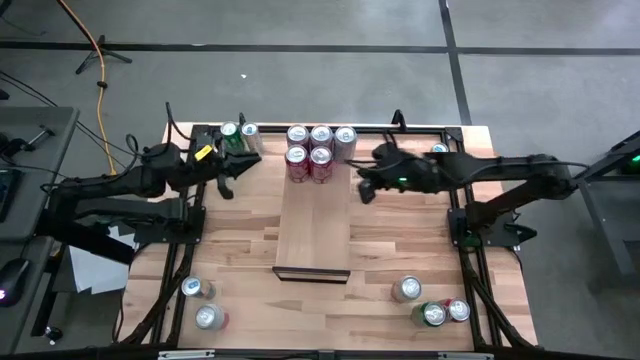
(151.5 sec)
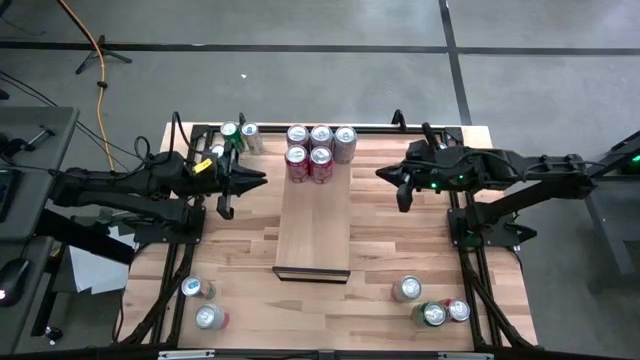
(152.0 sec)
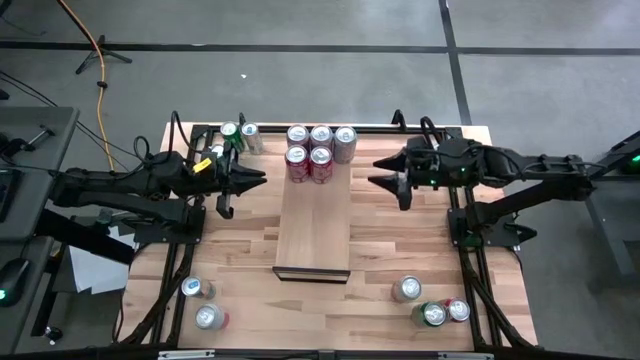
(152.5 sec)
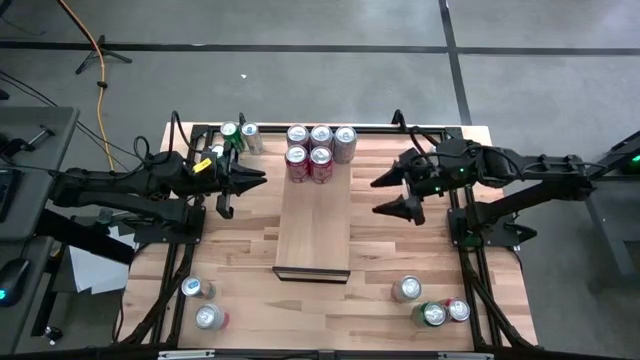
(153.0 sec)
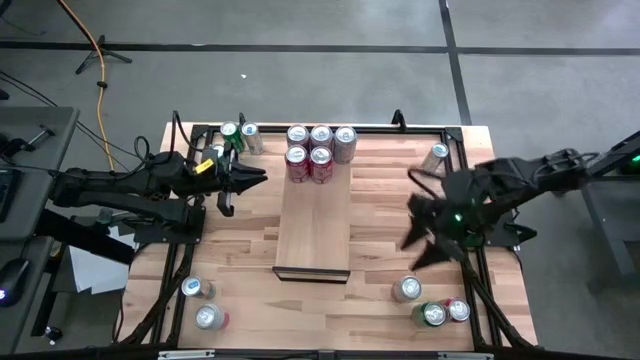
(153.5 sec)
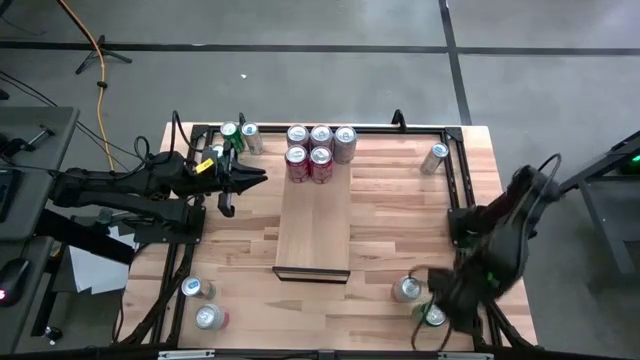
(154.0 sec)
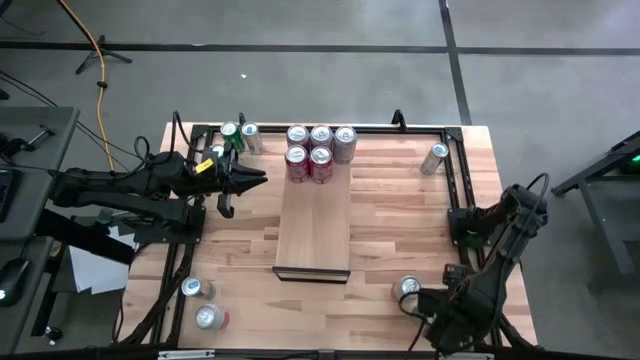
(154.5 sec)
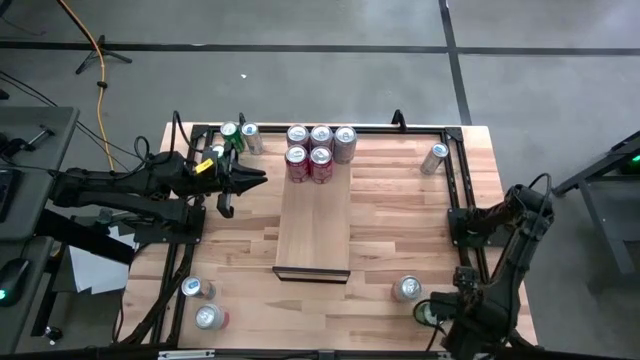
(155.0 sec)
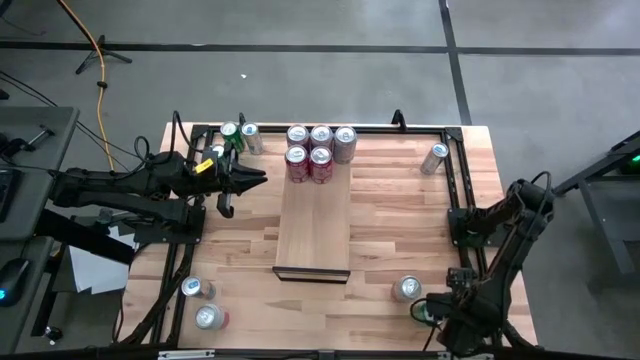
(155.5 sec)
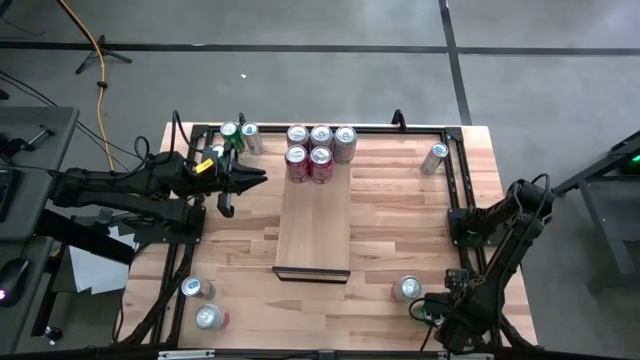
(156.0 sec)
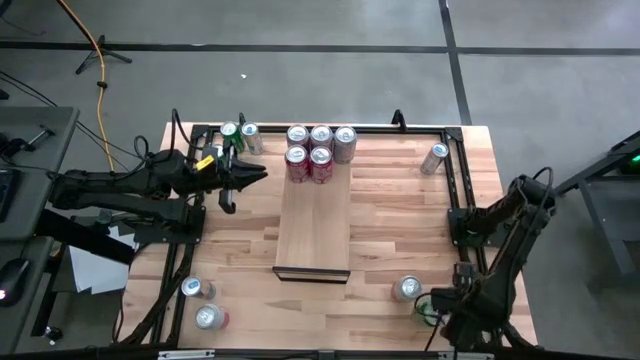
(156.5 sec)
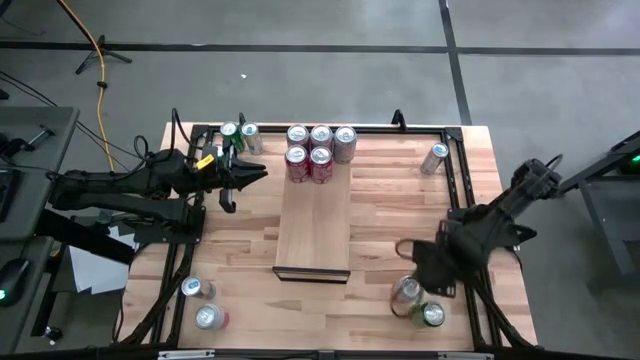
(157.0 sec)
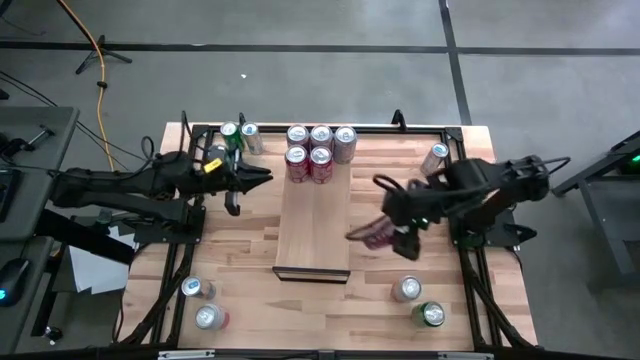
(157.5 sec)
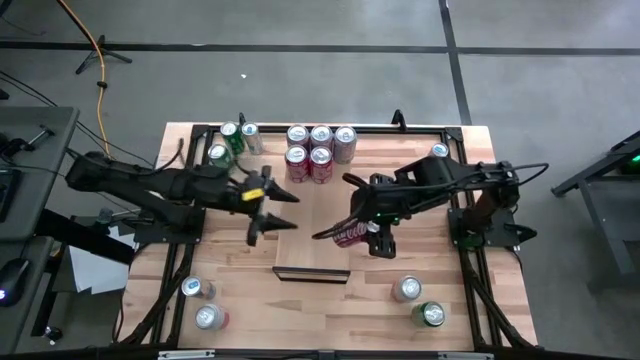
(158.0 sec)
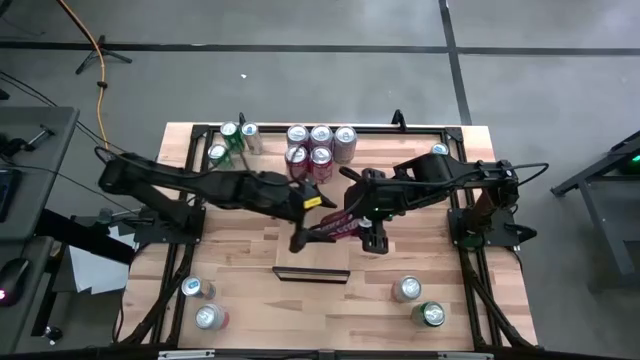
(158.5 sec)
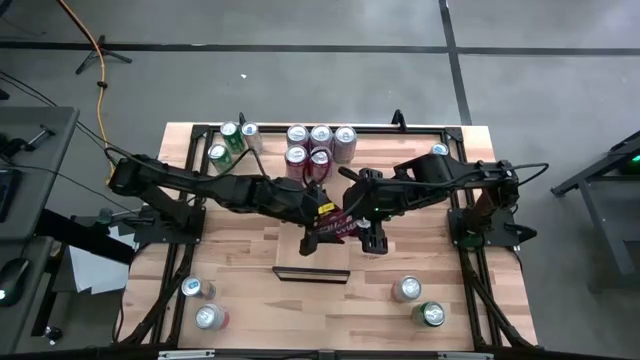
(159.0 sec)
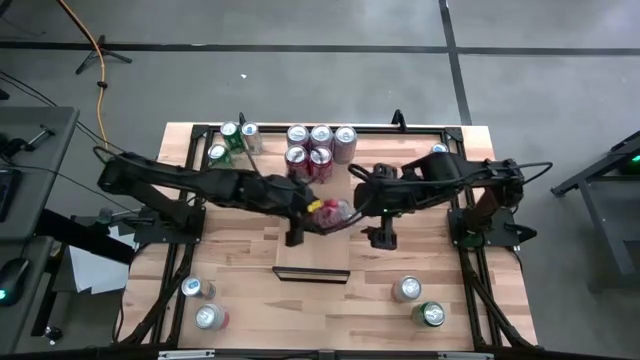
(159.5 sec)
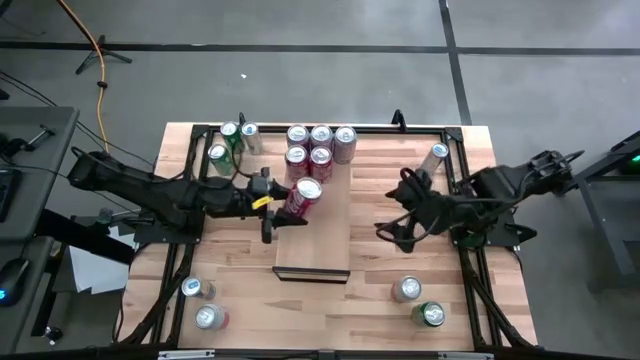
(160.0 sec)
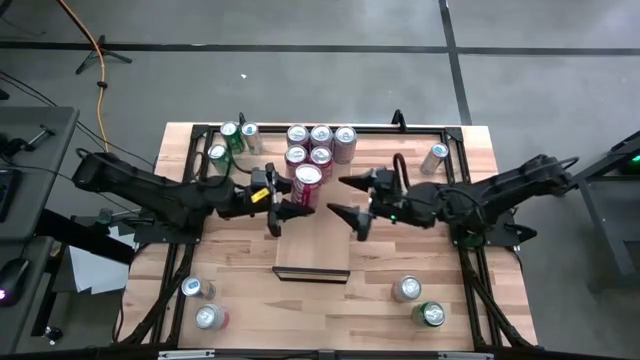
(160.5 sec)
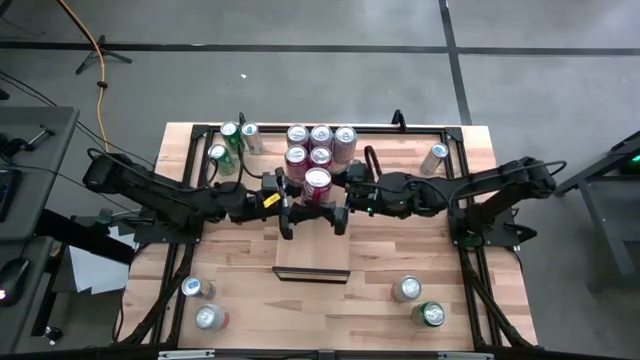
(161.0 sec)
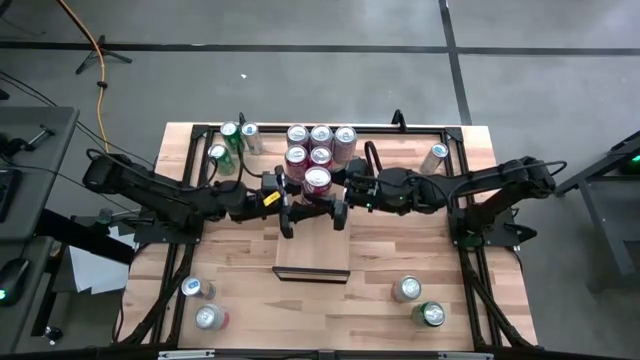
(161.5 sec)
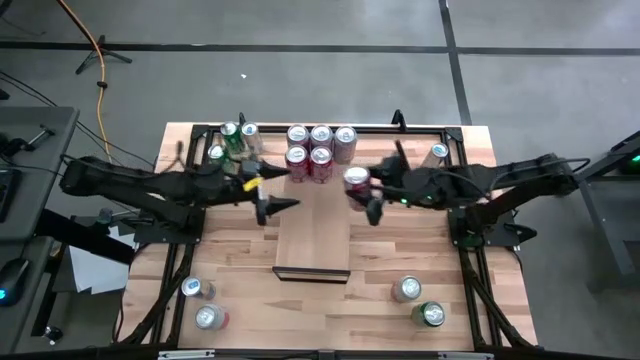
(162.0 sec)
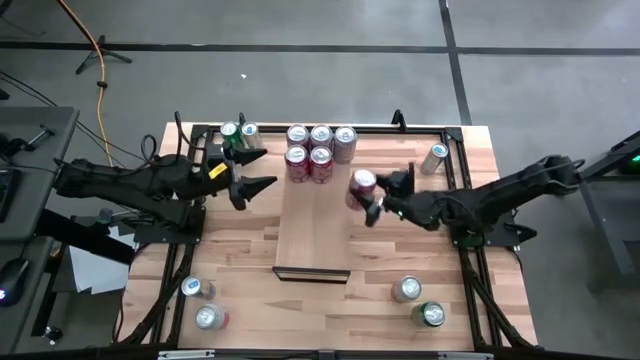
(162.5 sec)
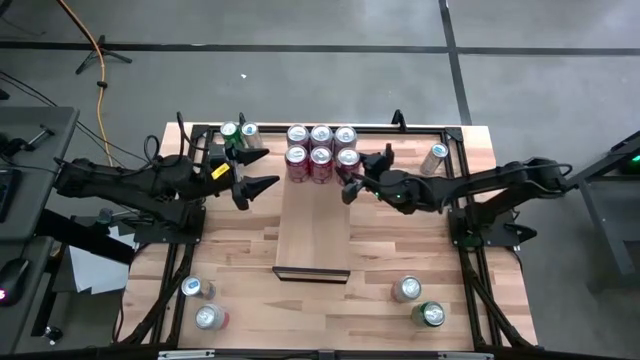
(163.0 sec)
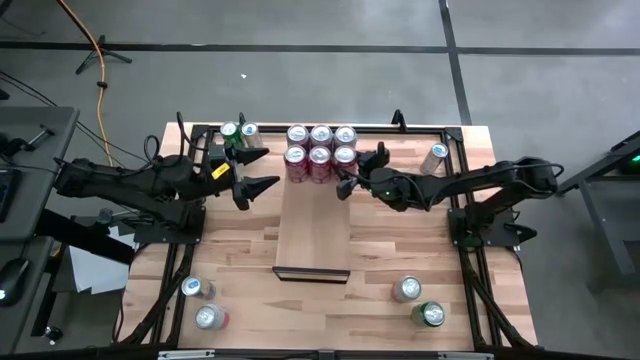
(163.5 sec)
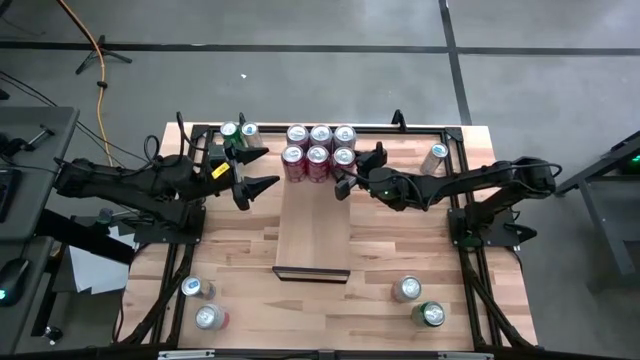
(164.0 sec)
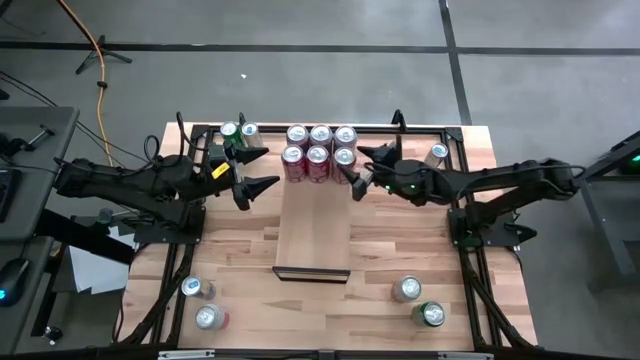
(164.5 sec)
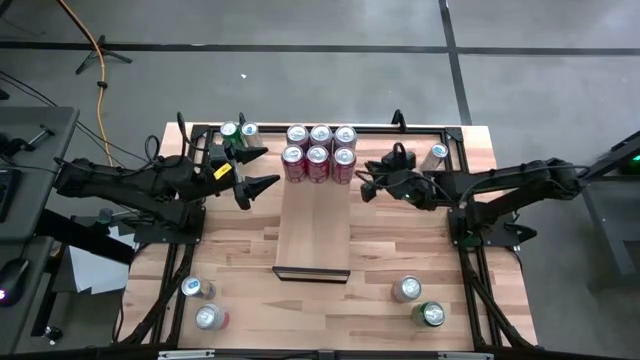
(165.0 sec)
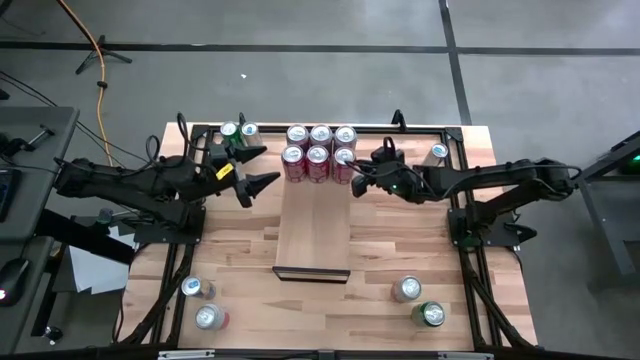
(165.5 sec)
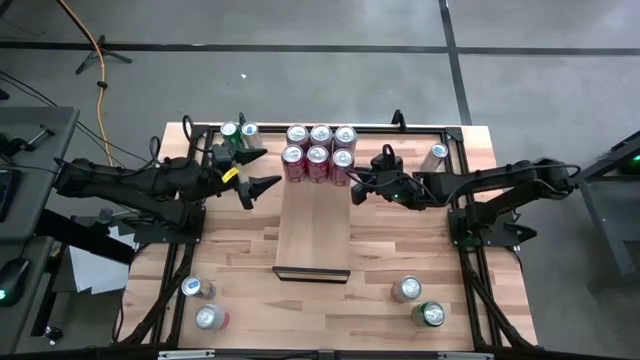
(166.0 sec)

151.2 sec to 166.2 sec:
Task: Place canned beverage on shelf
Put the red soda can on the shelf

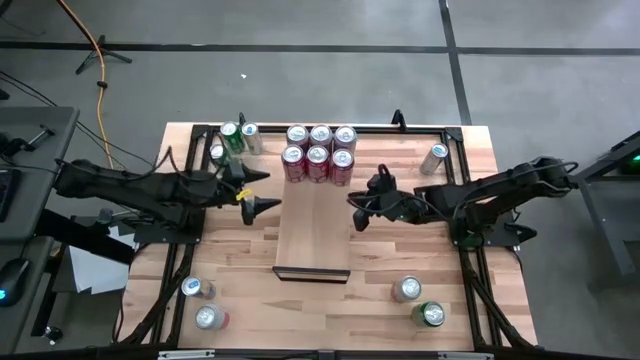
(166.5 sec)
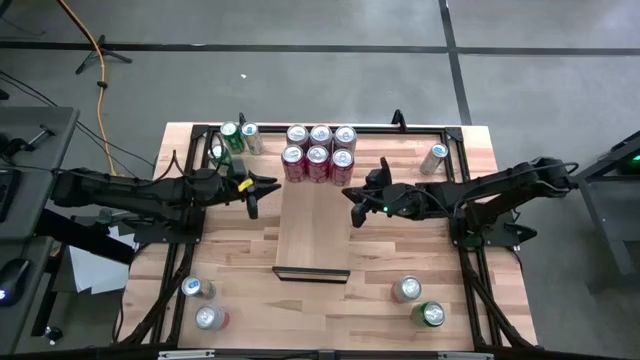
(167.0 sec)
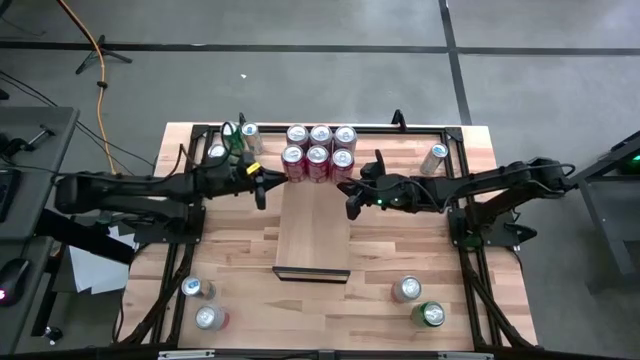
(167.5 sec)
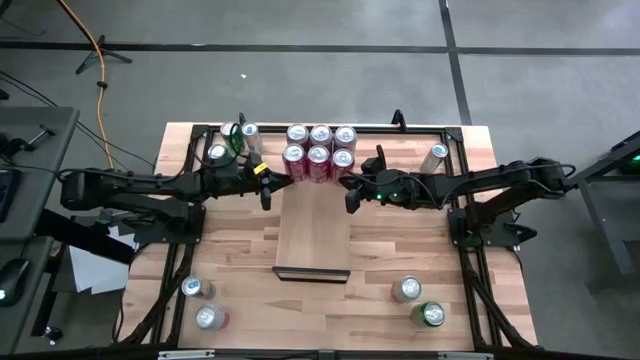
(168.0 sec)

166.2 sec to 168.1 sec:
Adjust the soda cans on the shelf

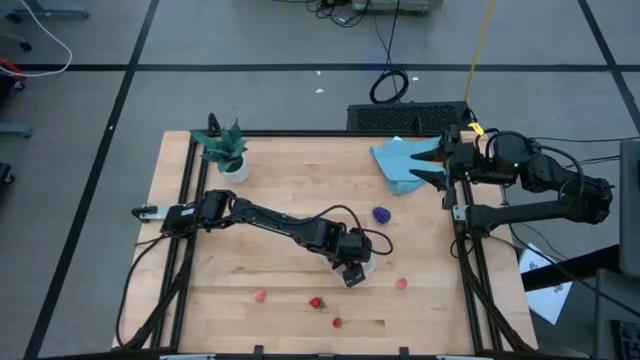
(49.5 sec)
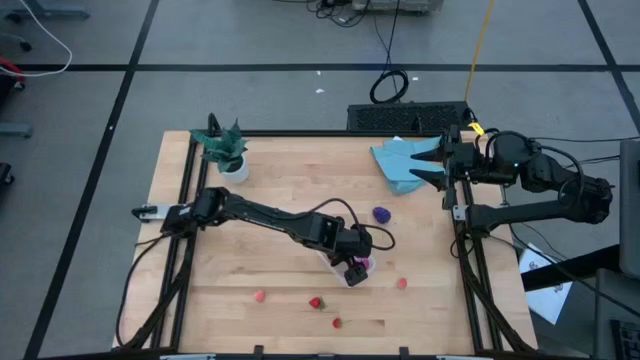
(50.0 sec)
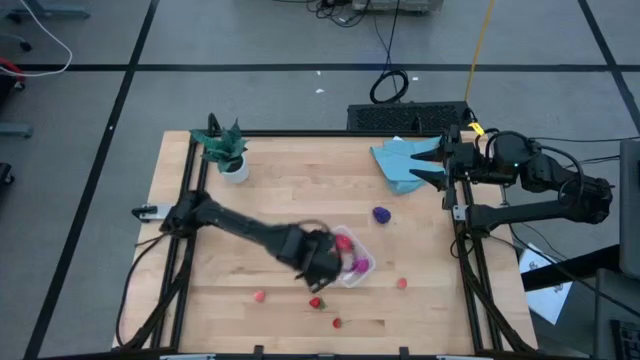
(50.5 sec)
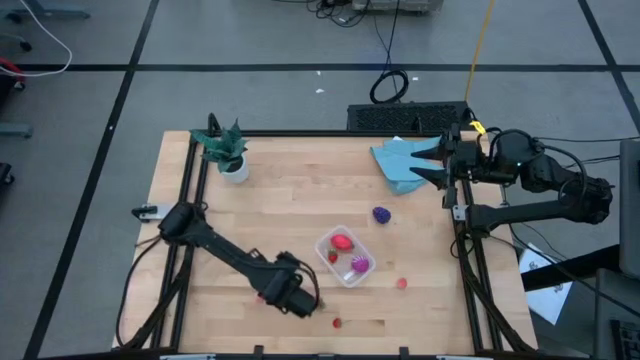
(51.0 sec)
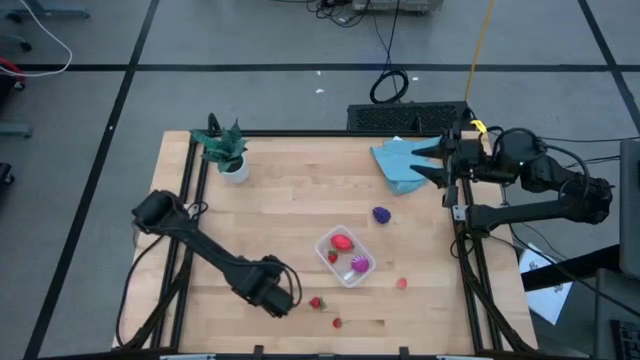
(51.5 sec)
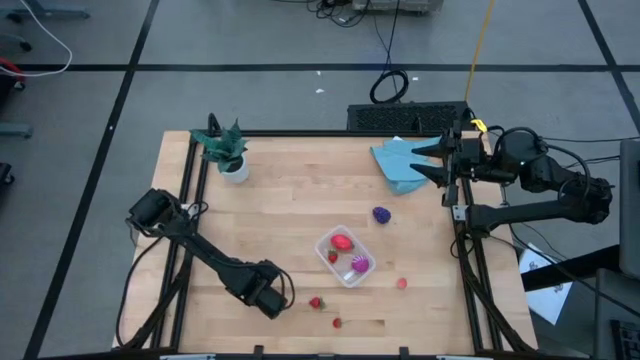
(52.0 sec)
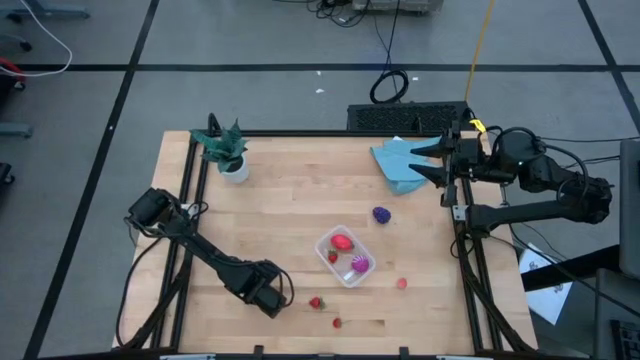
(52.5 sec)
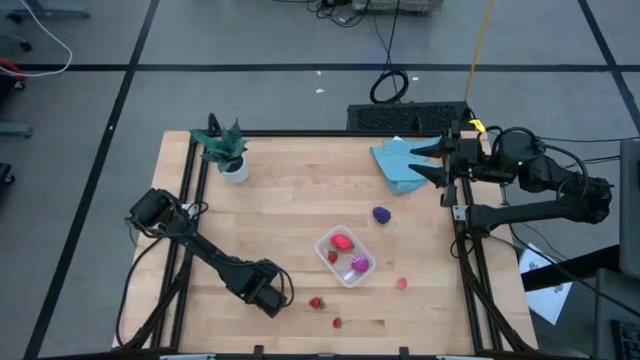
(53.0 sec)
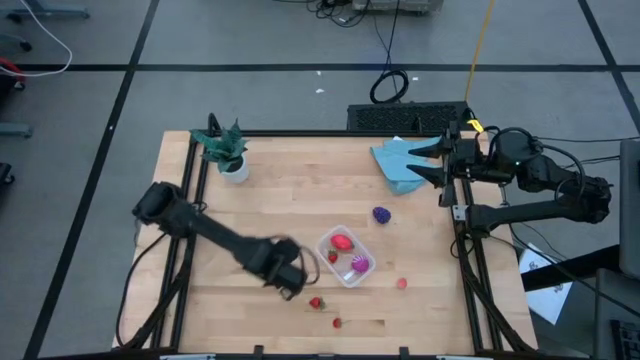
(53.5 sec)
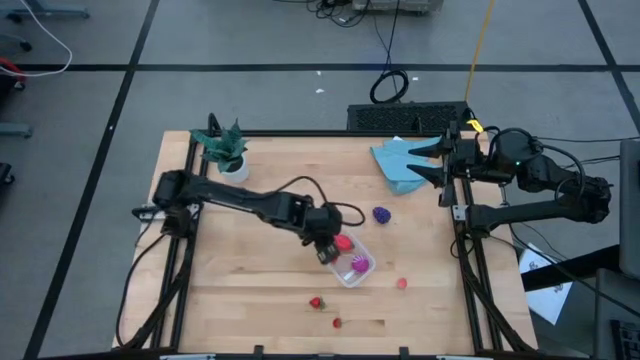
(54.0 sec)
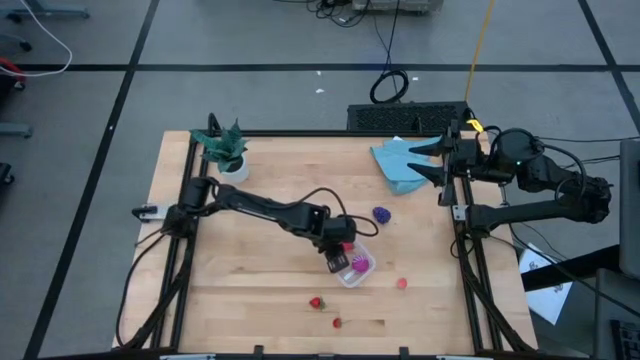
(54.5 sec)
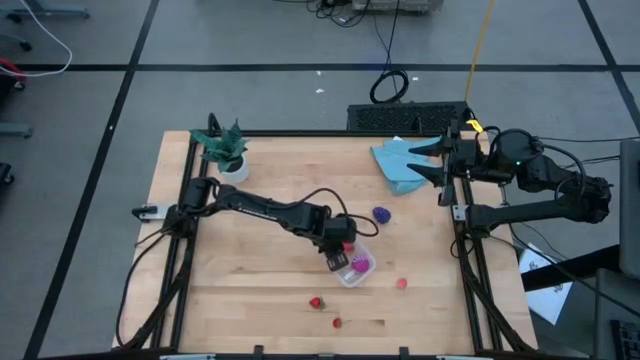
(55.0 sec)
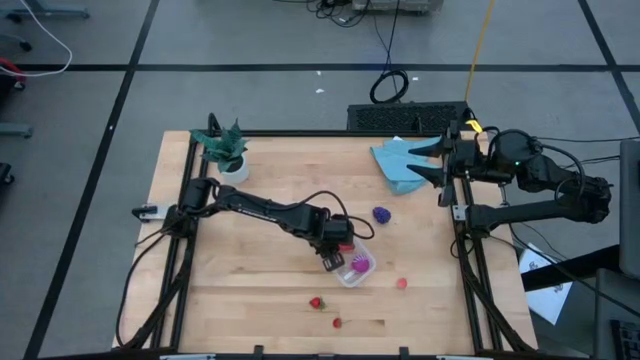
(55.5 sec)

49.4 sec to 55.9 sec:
Task: Pick and placing Produce into tupperware
Put the bottom peach into the transparent container
